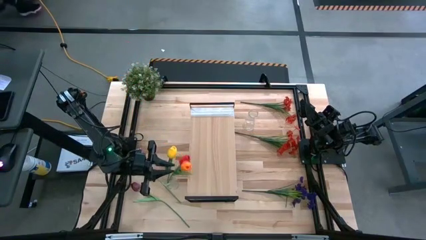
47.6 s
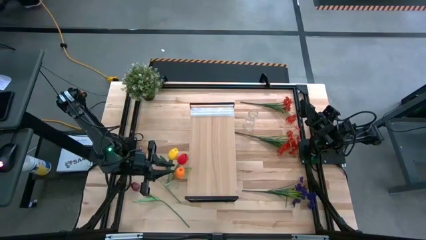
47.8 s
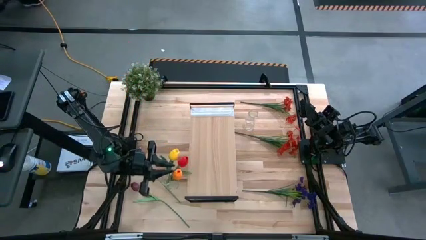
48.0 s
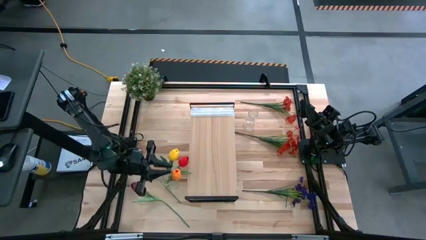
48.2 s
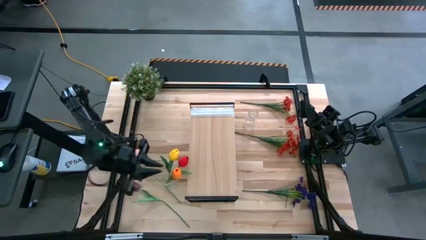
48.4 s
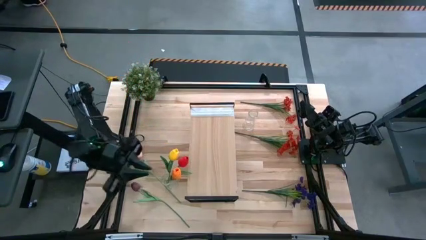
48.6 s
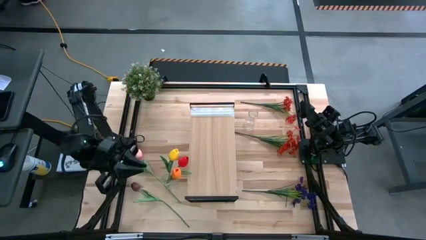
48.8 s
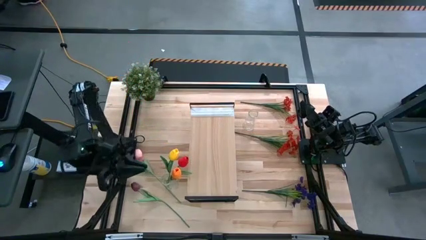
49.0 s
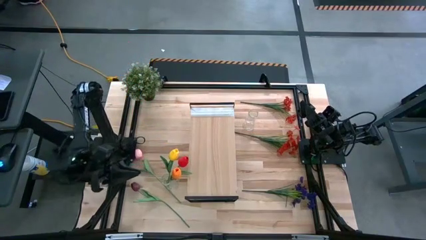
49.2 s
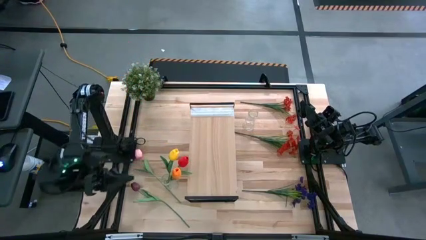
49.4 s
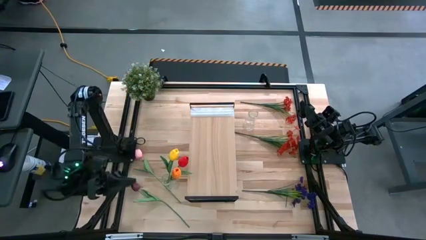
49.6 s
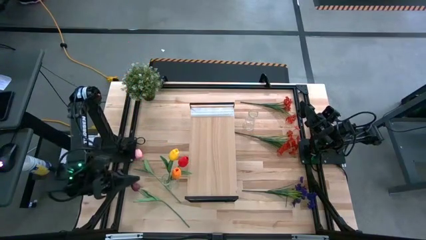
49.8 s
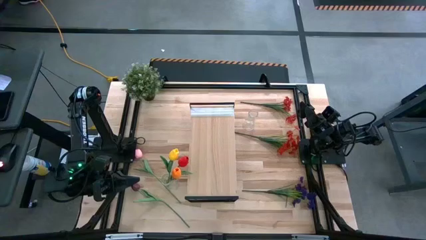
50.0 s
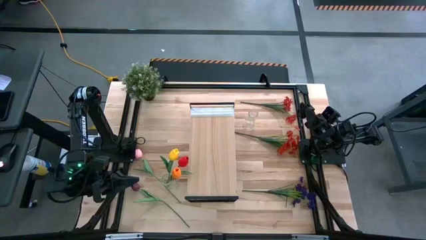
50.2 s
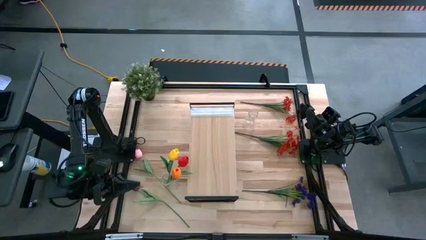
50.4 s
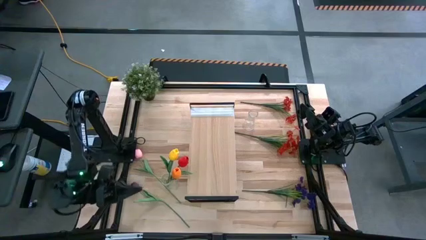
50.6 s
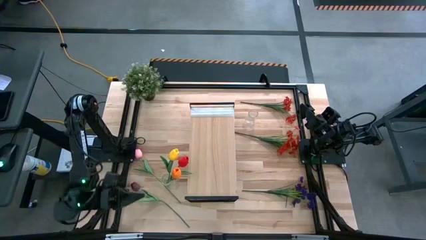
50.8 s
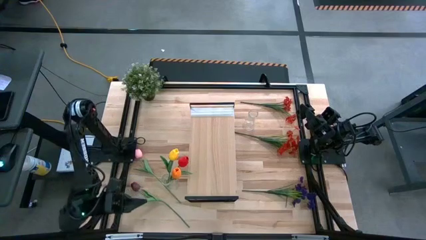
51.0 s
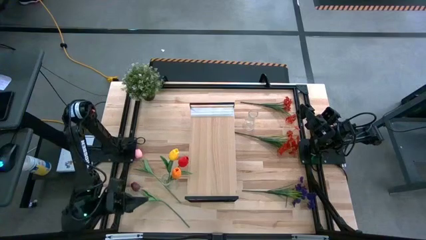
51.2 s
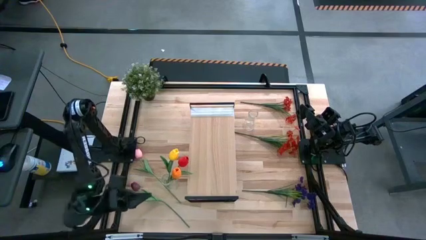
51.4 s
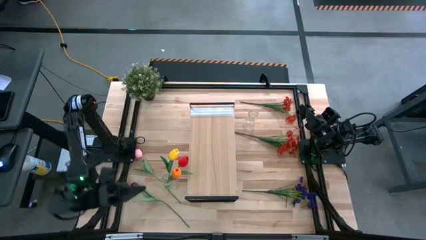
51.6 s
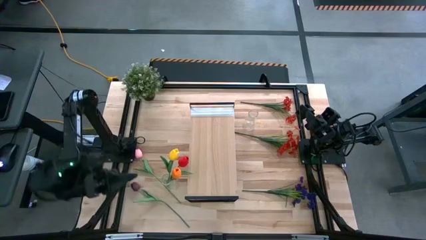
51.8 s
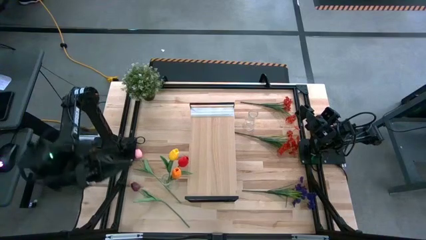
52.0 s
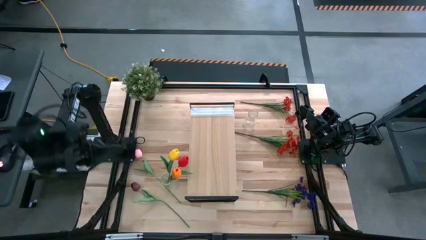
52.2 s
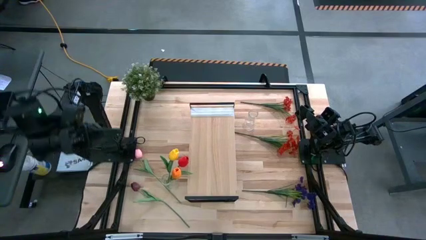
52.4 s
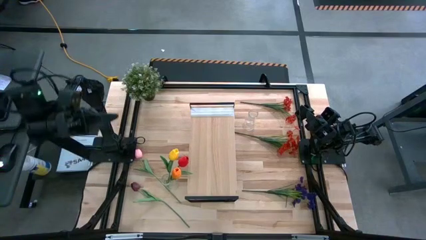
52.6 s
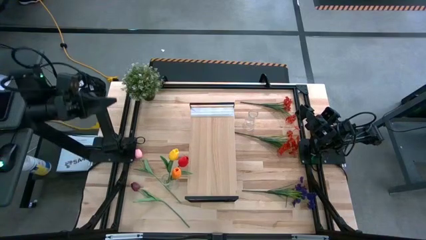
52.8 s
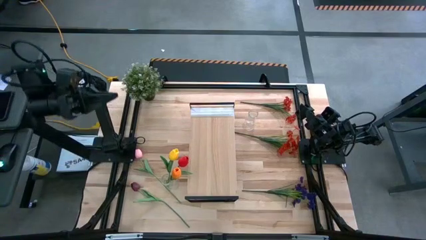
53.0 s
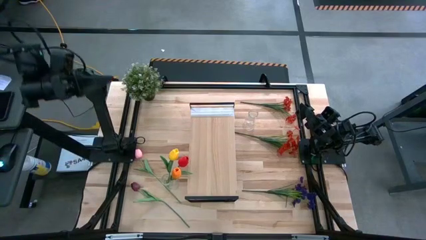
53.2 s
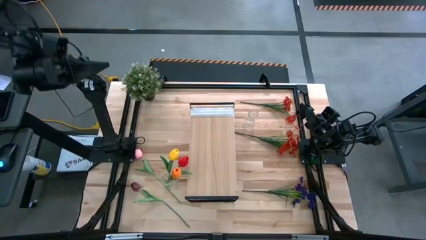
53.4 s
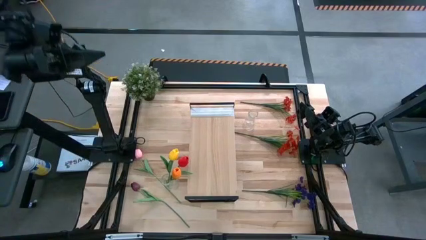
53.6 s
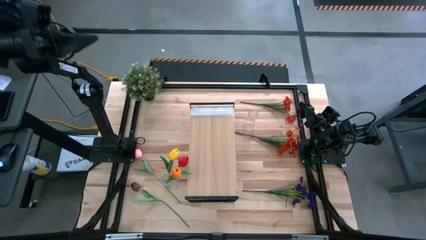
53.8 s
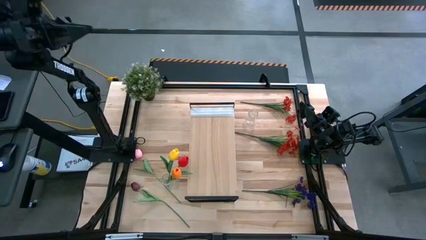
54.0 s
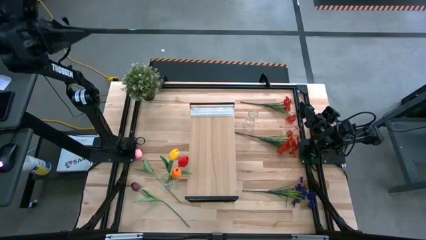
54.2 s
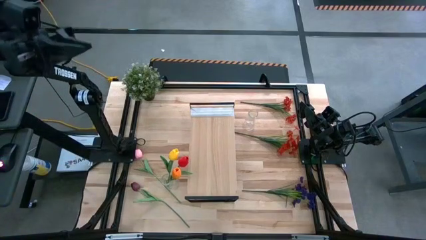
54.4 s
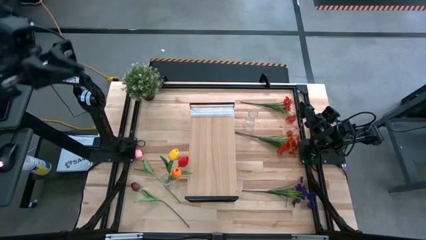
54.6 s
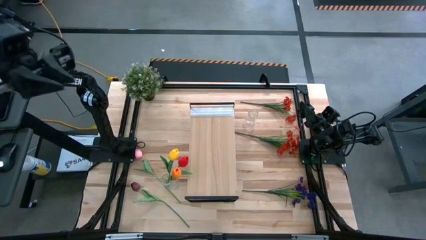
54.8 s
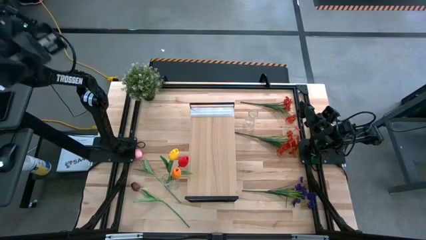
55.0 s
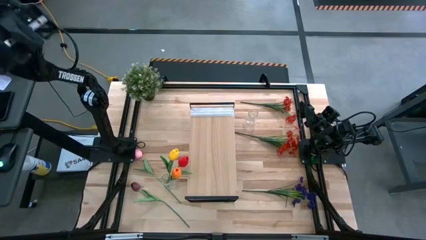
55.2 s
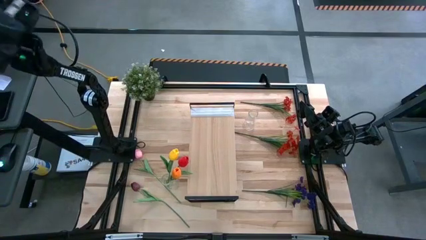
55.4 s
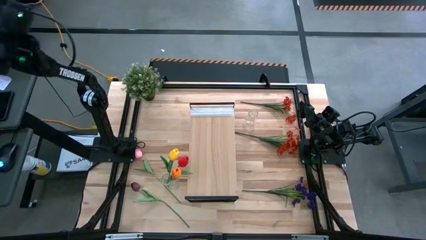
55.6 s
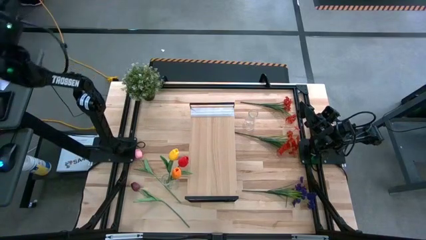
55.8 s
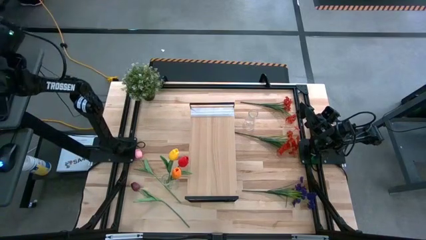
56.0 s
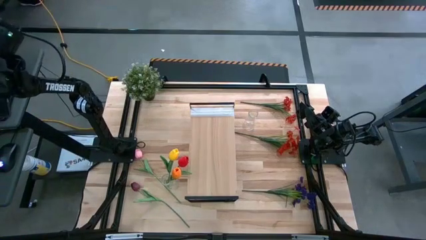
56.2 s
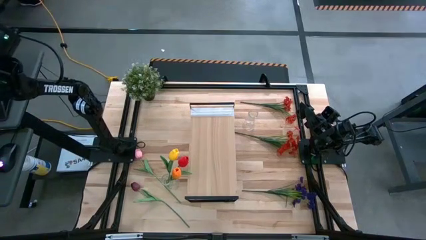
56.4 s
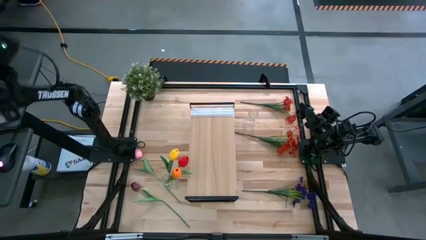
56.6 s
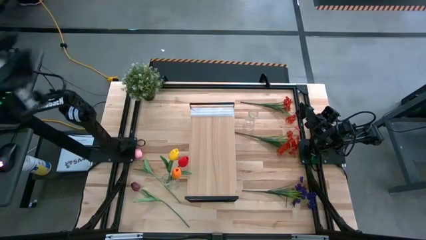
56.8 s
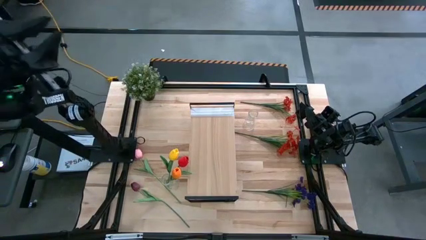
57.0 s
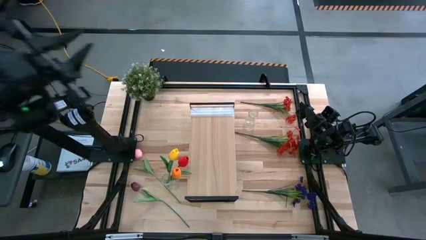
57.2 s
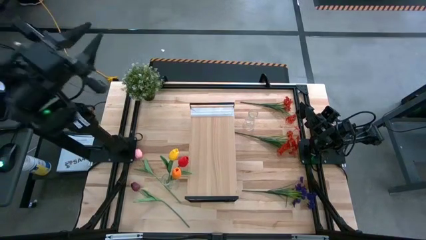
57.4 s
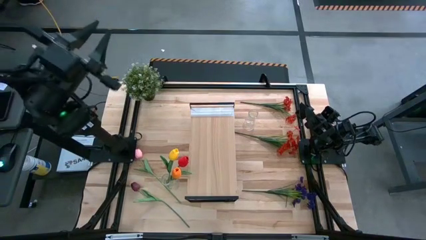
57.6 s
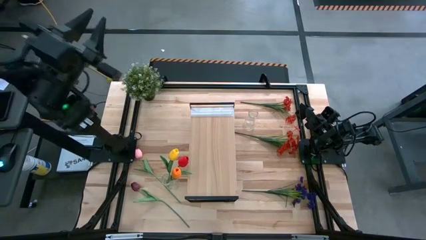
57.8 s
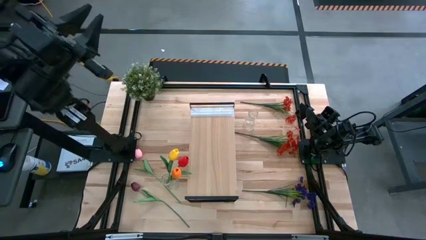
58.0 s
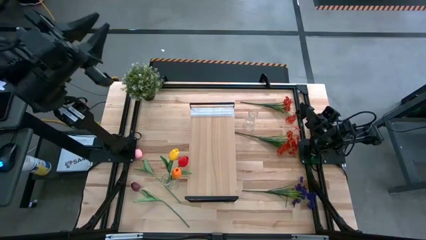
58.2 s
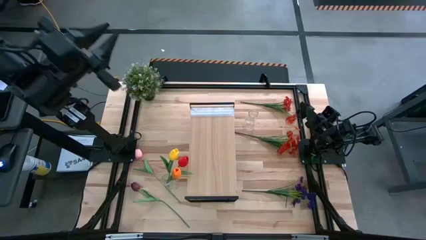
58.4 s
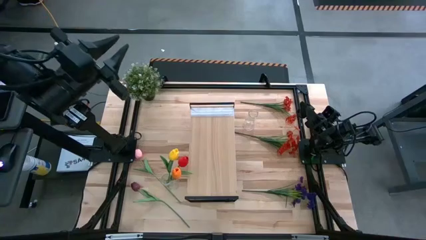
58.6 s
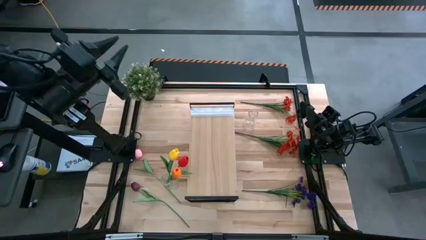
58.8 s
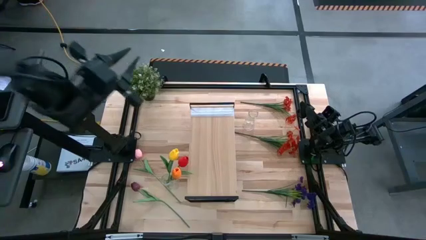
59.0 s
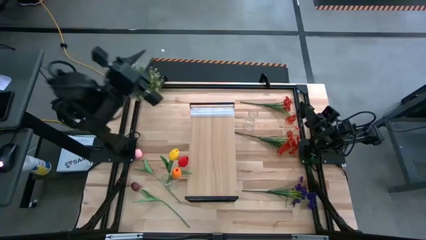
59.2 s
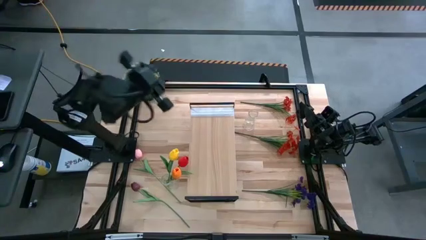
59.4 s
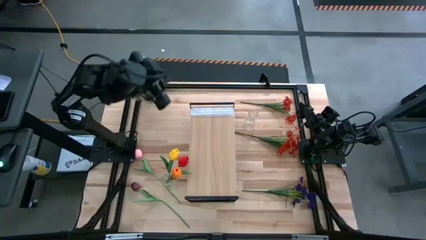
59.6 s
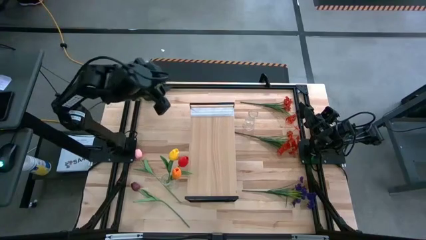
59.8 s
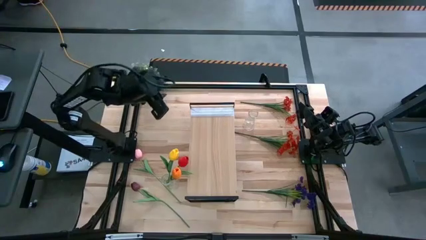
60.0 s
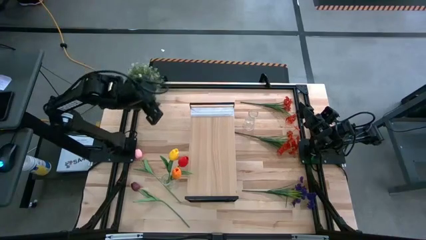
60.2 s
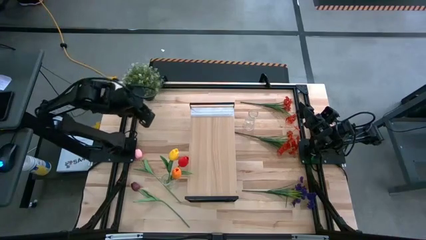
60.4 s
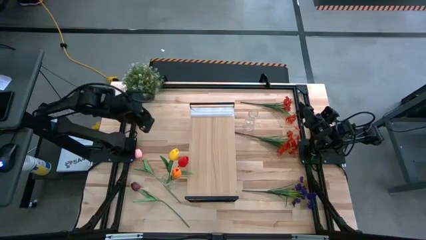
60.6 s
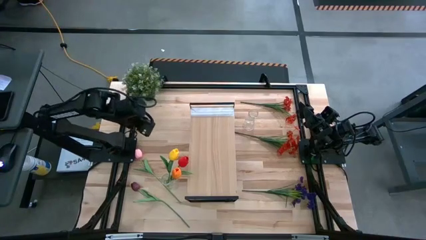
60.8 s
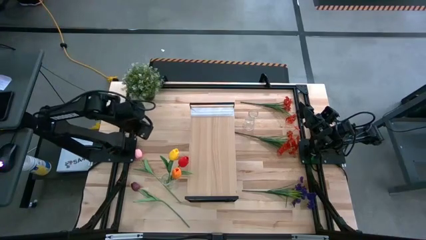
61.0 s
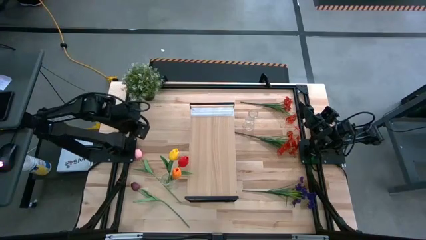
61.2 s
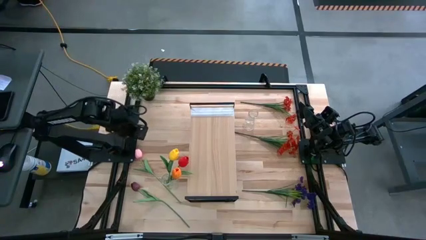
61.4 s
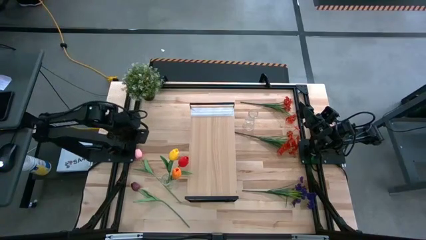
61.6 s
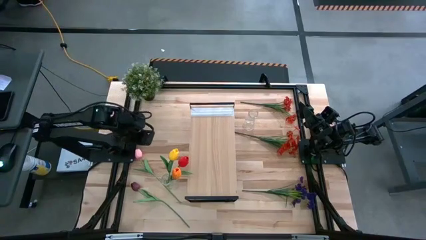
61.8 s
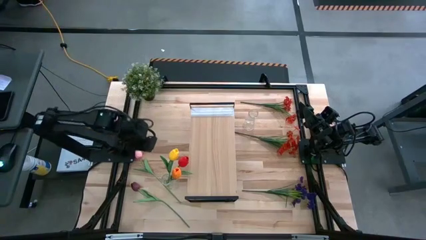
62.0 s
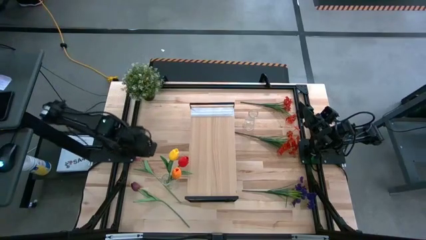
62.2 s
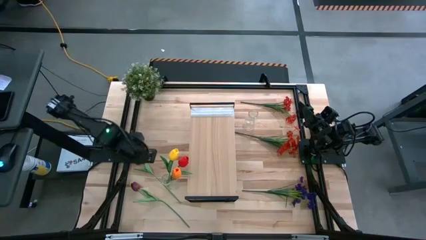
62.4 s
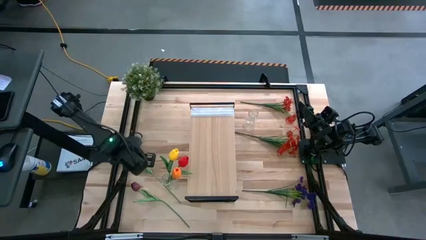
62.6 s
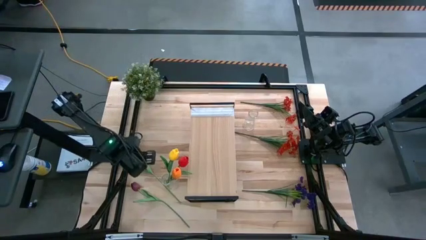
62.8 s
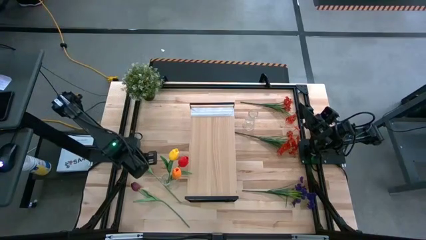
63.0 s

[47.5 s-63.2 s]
Task: Pick and place flowers into a vace then onto a shelf
Put the pink tulip into the bottom vase

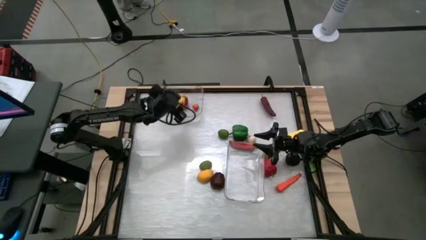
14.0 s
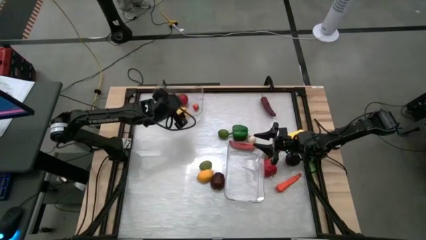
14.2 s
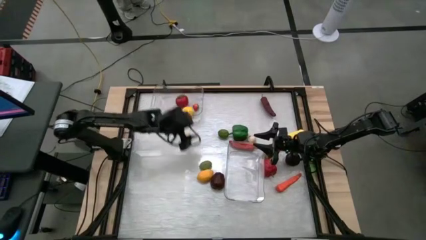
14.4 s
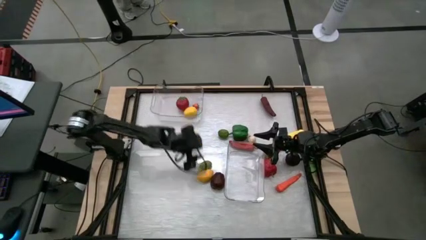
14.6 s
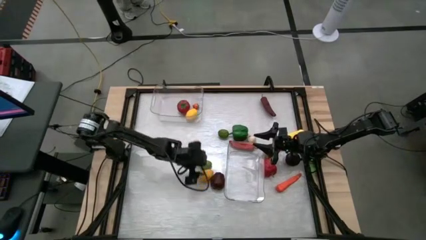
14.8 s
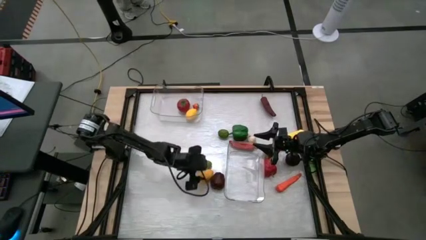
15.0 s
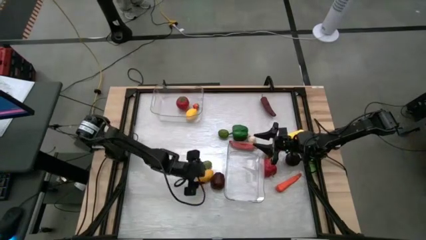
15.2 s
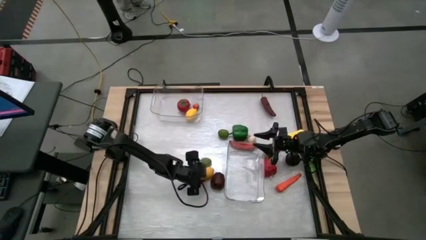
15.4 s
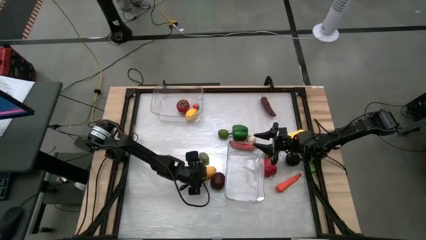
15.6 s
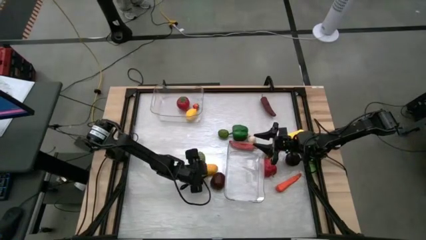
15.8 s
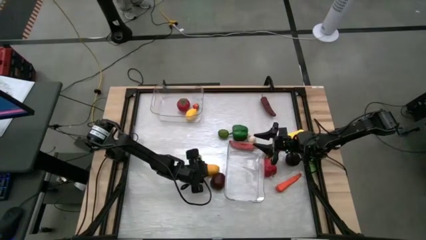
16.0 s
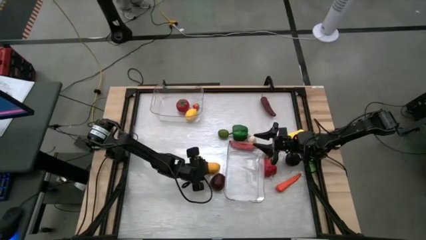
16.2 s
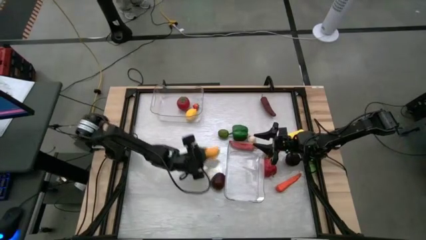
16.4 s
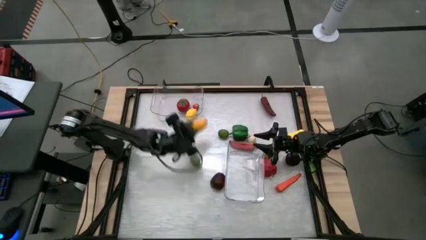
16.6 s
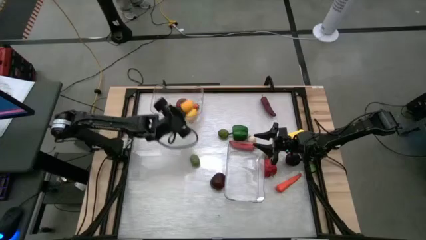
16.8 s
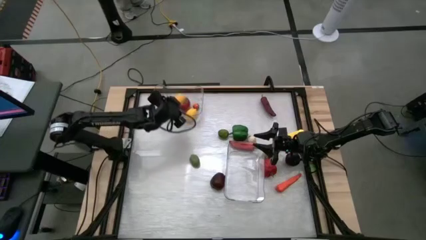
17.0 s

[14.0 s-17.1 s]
Task: Sort produce into baskets
Put the yellow lemon into the top transparent bin
